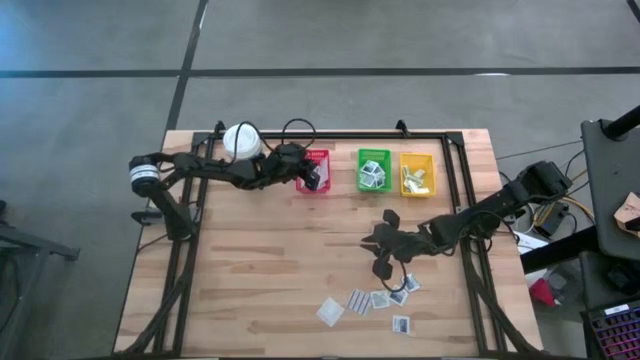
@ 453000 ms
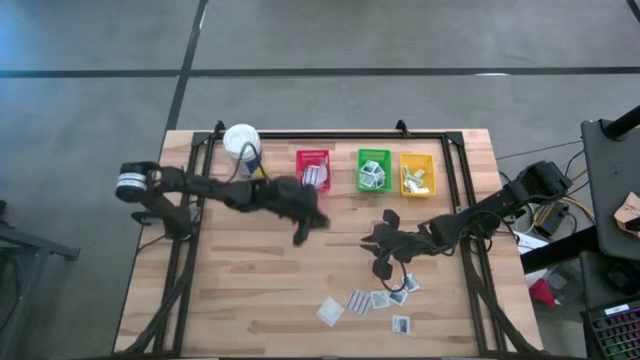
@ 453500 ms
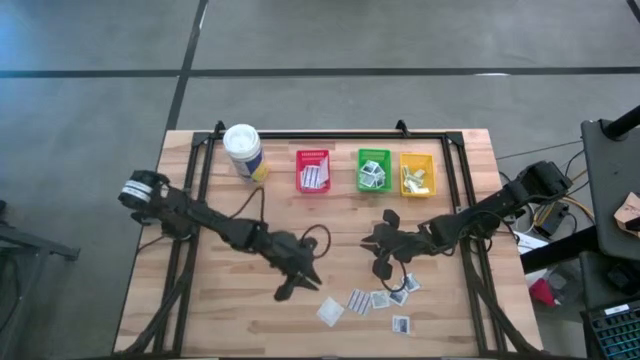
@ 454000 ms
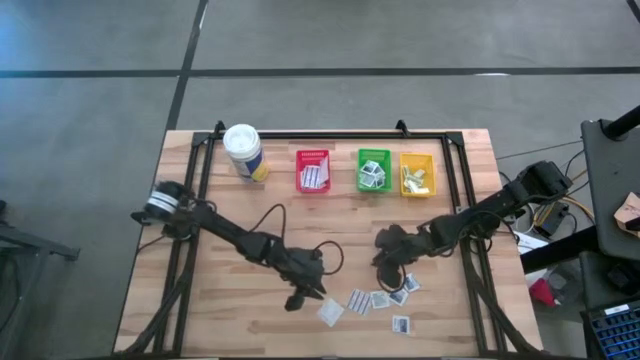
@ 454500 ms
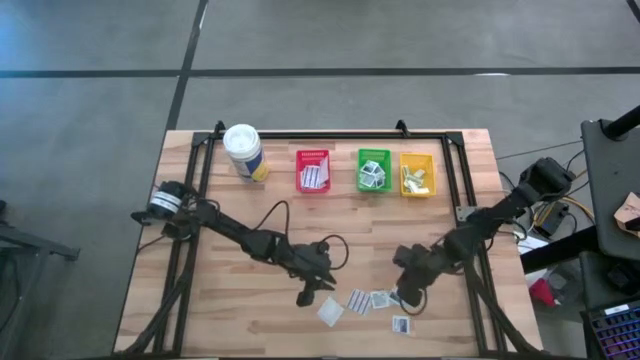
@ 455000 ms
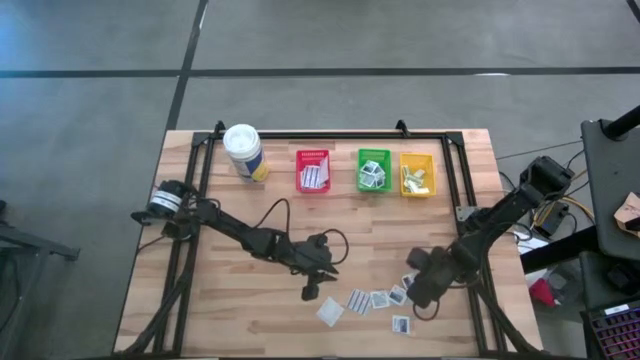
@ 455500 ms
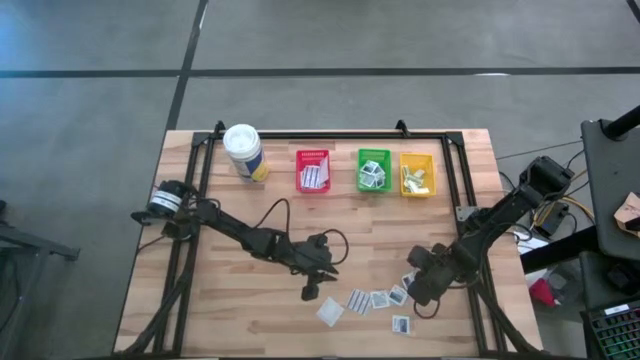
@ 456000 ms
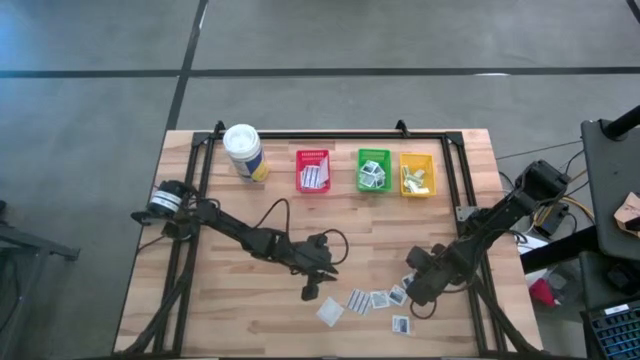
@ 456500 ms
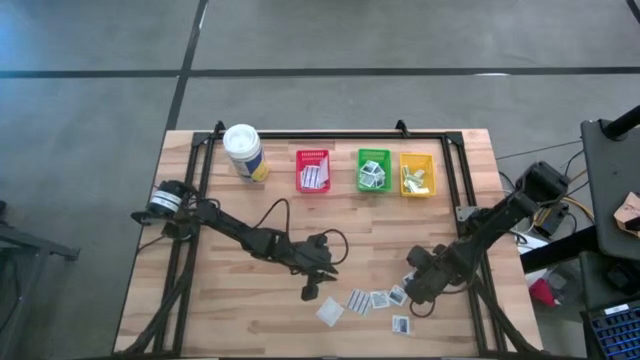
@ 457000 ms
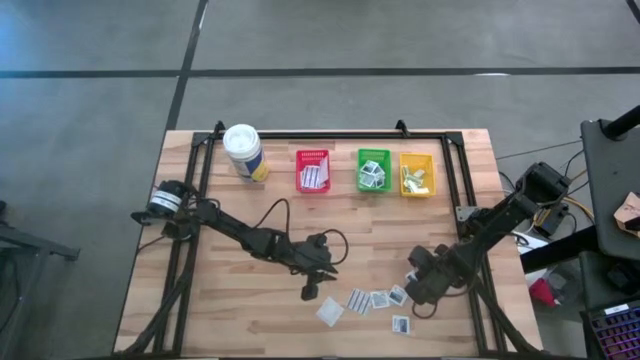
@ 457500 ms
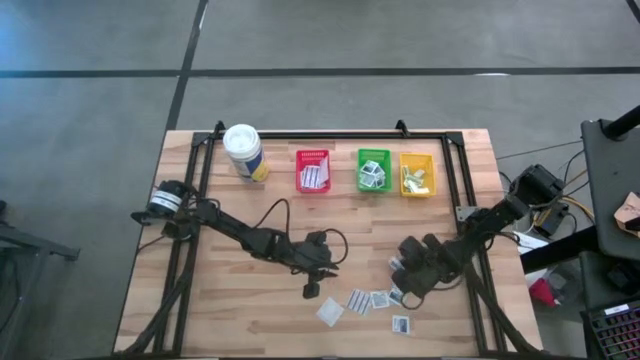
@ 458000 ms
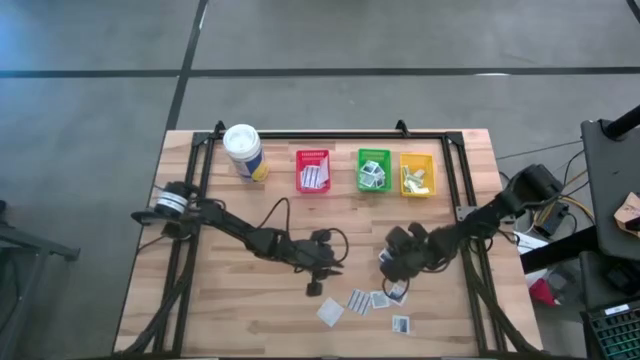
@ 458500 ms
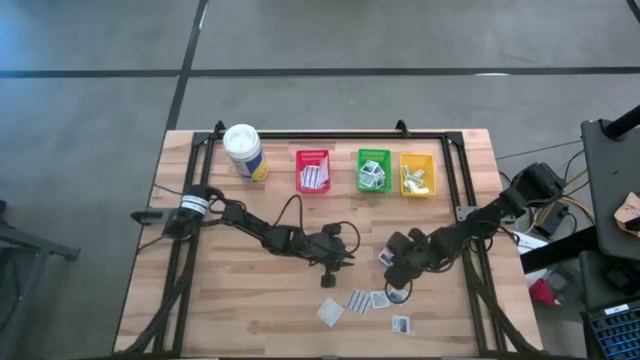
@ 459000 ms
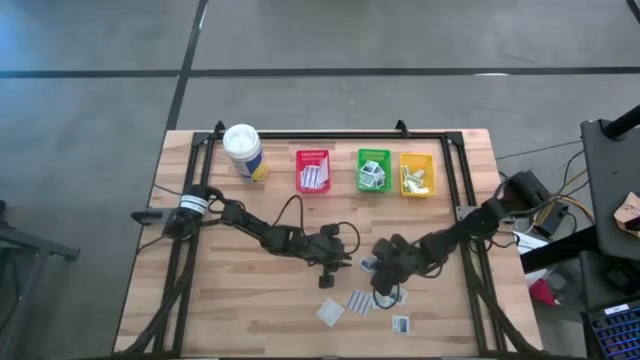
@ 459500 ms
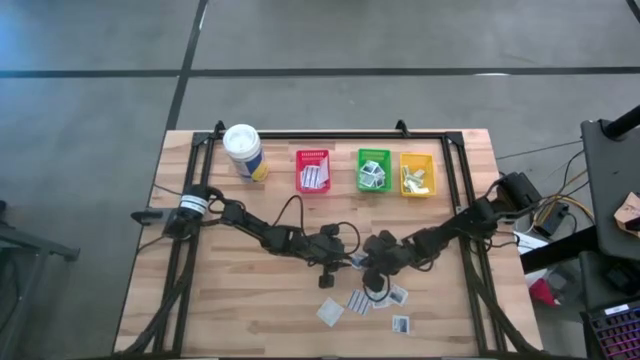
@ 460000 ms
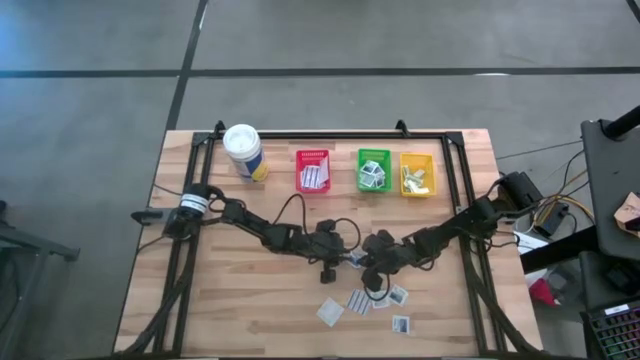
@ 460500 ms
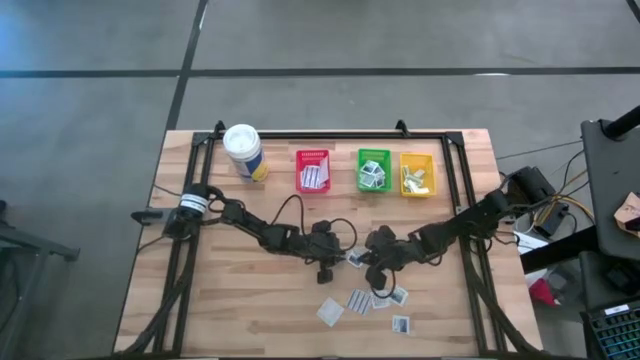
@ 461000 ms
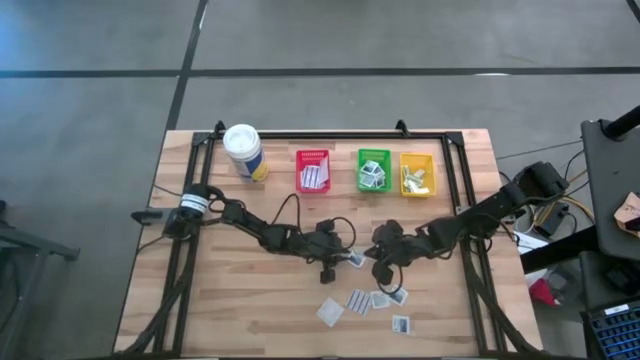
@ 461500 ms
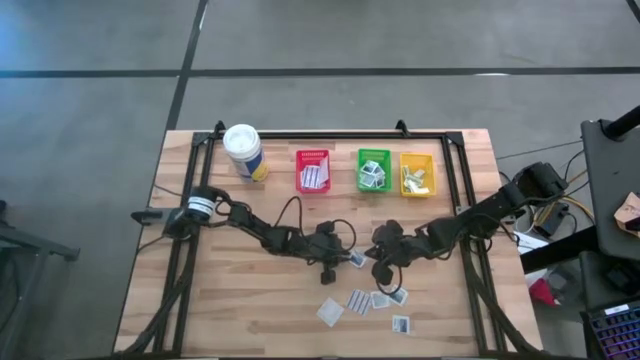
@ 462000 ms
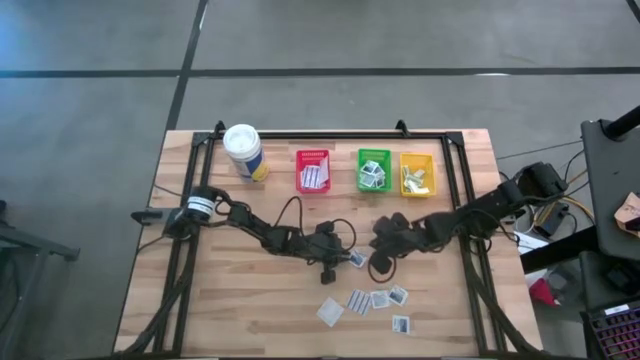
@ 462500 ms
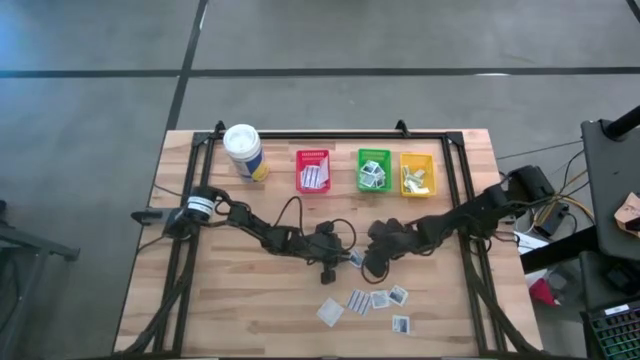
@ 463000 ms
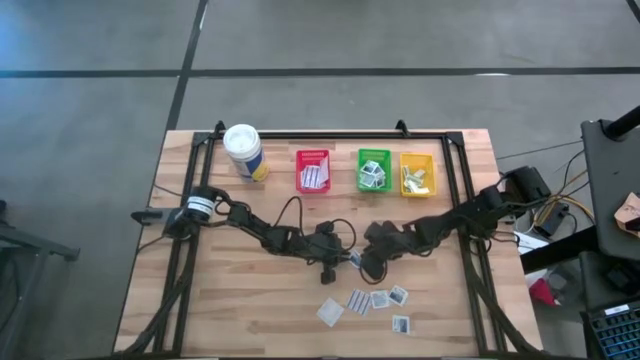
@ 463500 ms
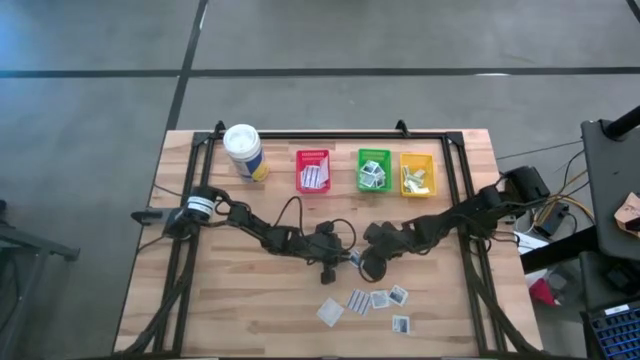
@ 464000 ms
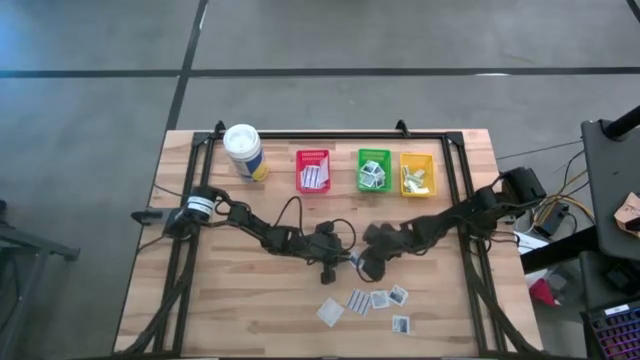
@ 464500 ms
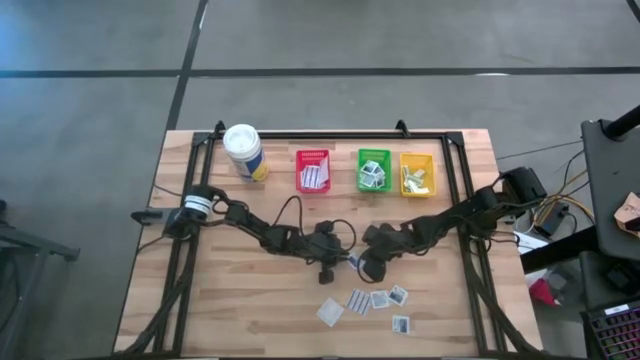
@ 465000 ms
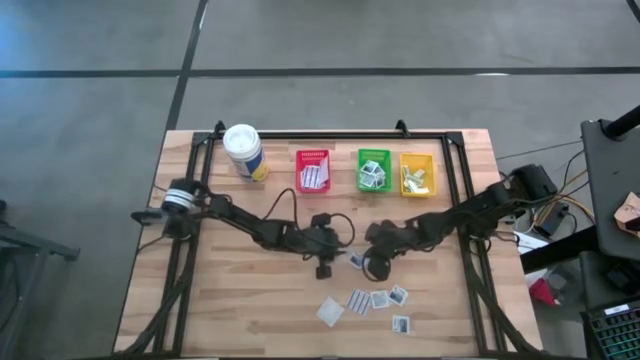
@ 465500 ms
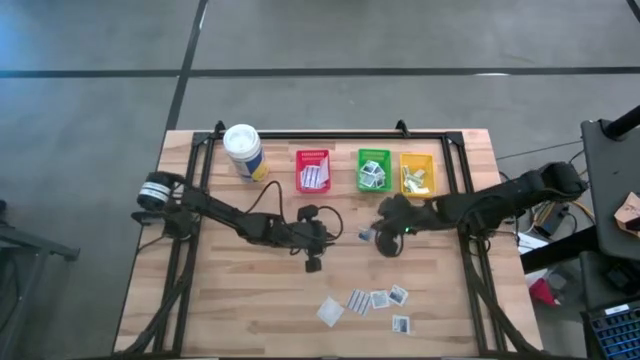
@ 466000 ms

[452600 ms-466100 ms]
Task: Pick & Place First Aid Supplies
Put the alcohol pad in the green bin

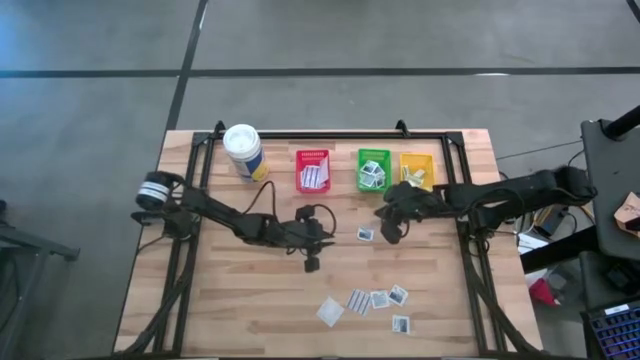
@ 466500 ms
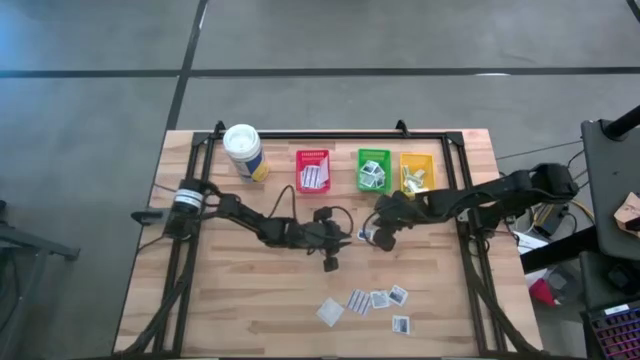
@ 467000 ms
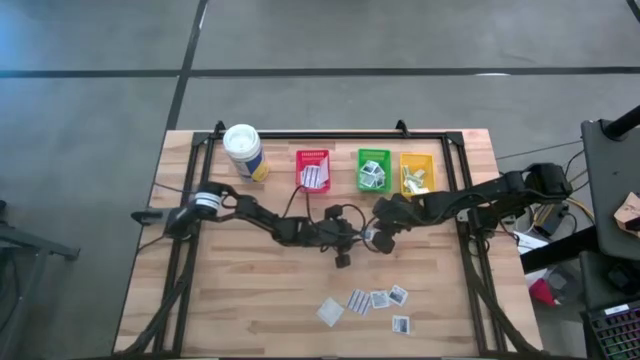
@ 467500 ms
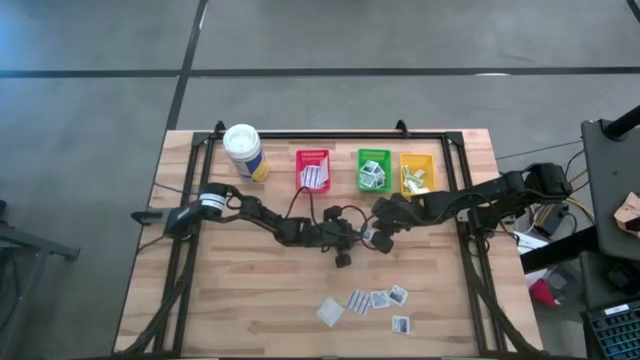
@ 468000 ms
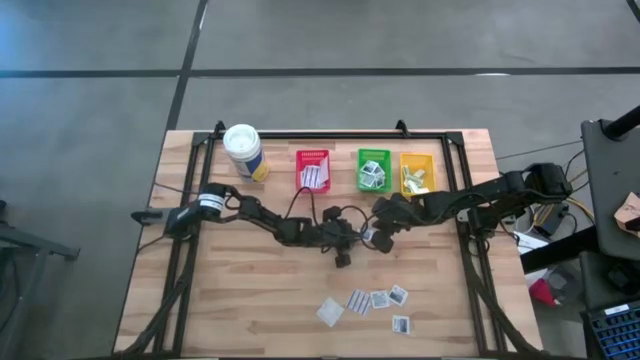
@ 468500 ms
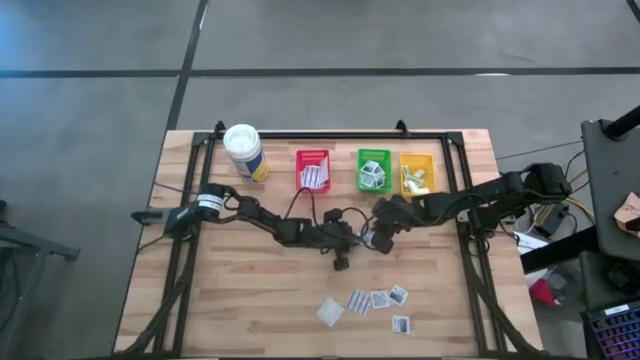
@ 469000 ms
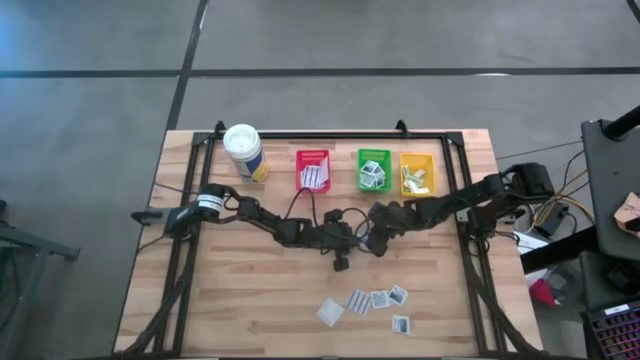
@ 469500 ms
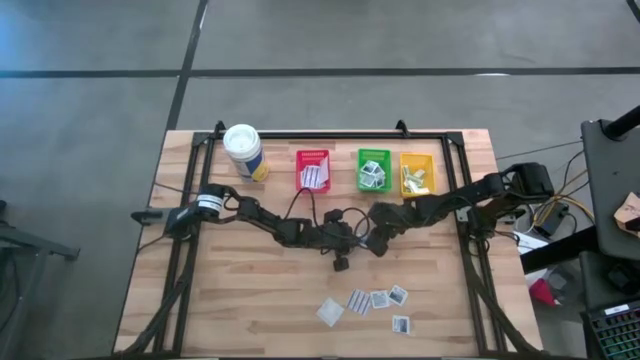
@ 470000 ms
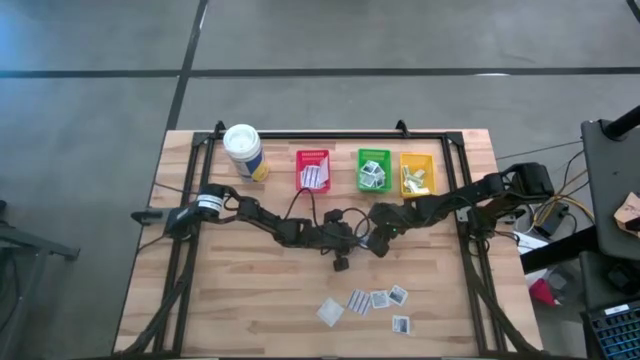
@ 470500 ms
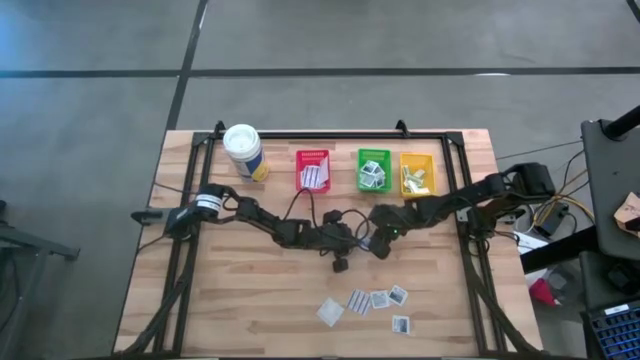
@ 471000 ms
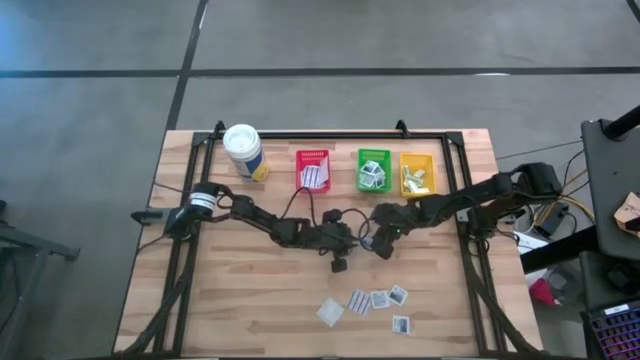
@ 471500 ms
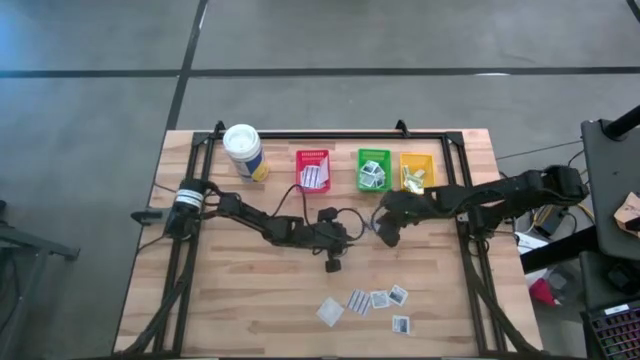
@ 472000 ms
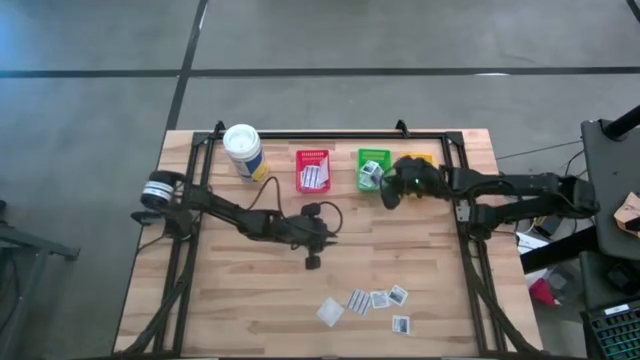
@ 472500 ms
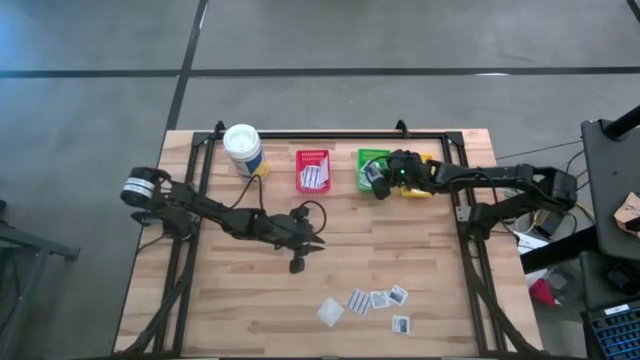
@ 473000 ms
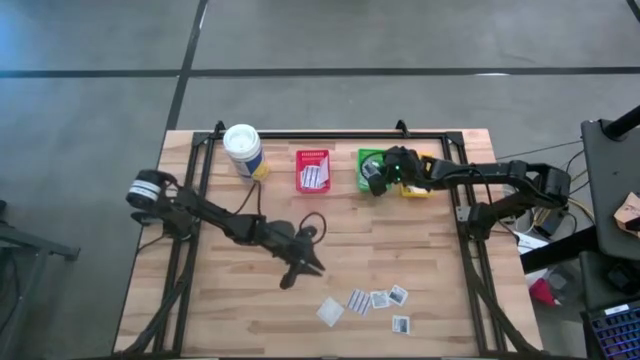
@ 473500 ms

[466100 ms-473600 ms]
Put the alcohol pad in the green bin
